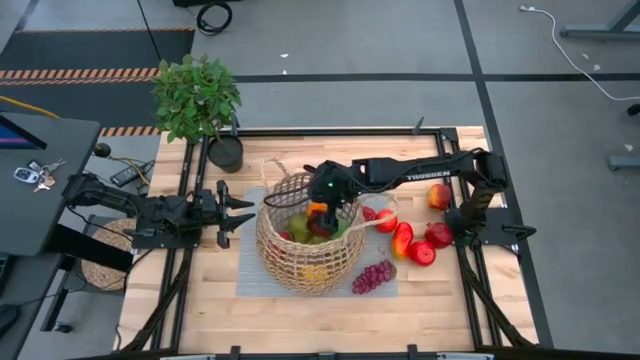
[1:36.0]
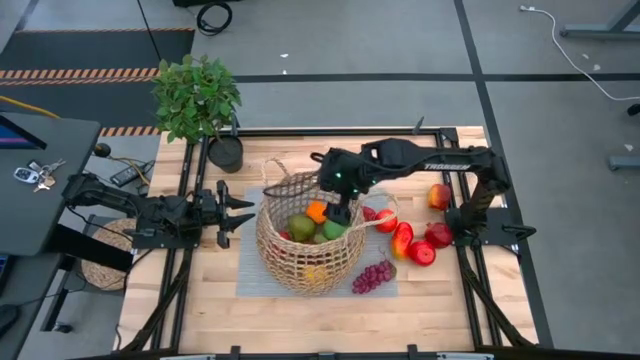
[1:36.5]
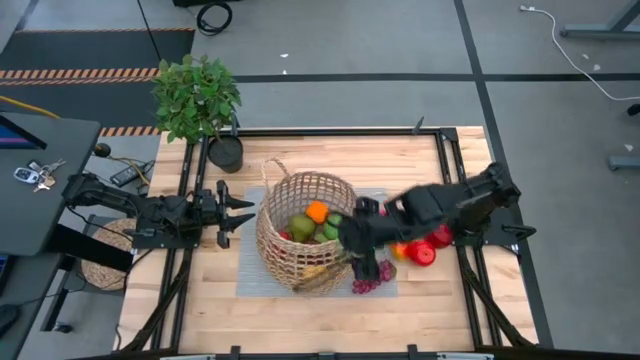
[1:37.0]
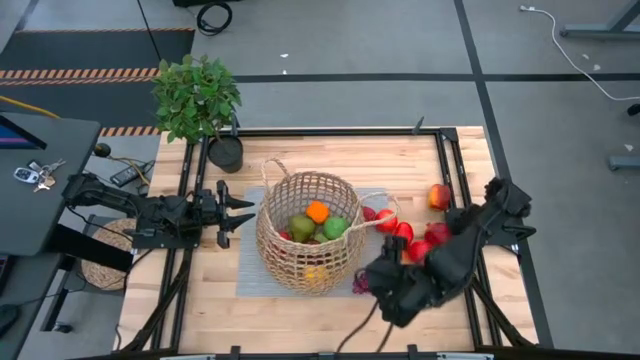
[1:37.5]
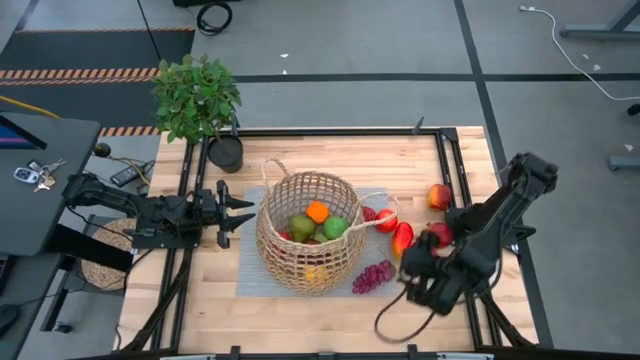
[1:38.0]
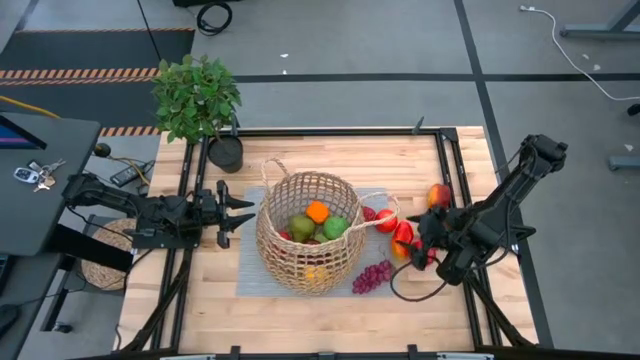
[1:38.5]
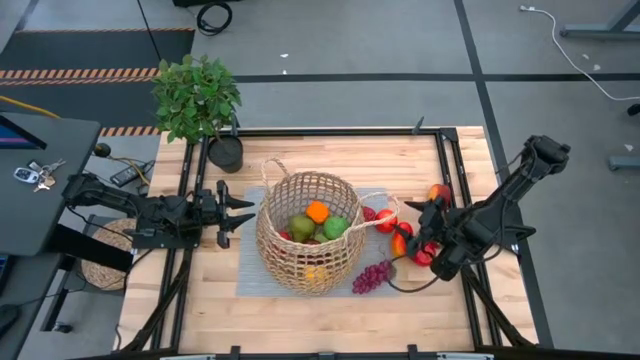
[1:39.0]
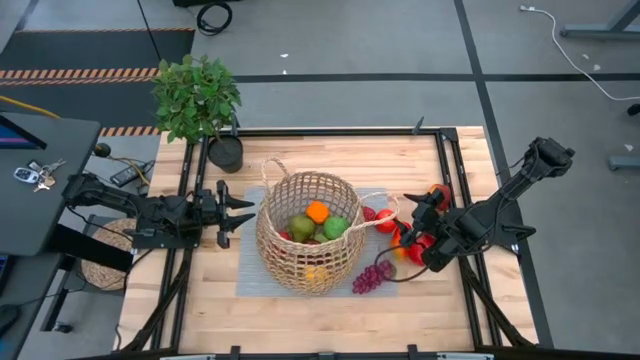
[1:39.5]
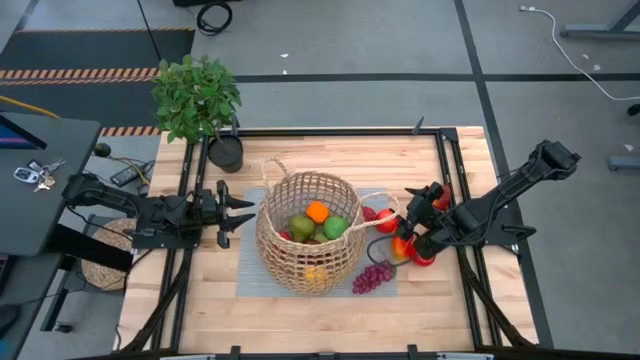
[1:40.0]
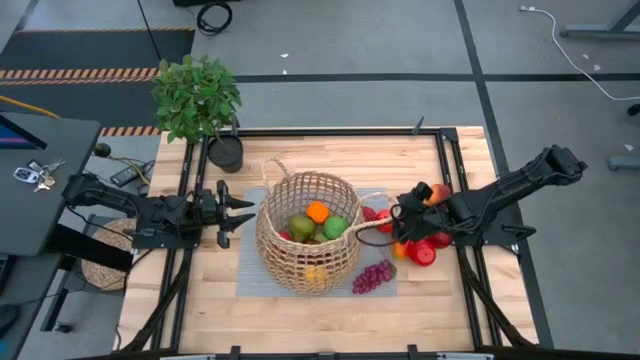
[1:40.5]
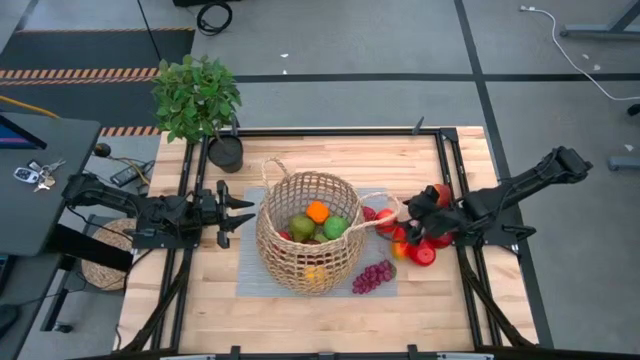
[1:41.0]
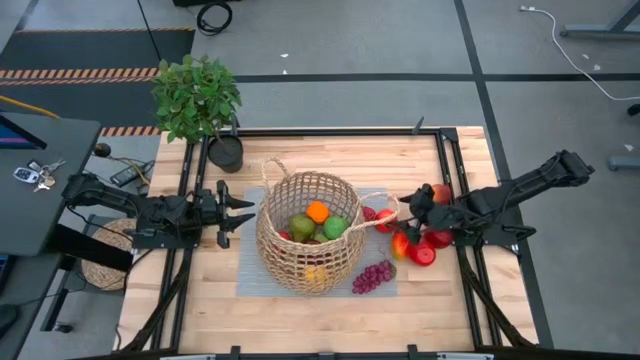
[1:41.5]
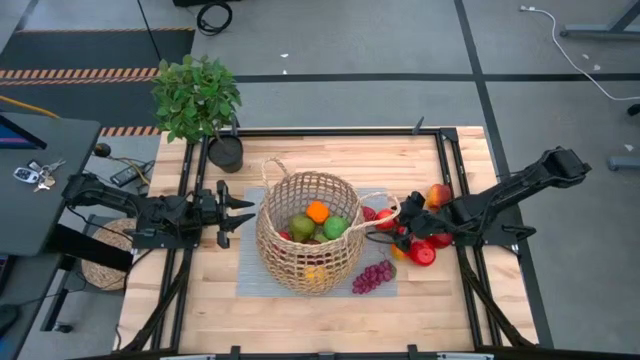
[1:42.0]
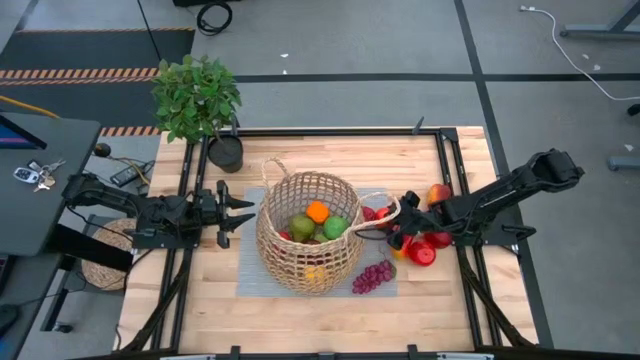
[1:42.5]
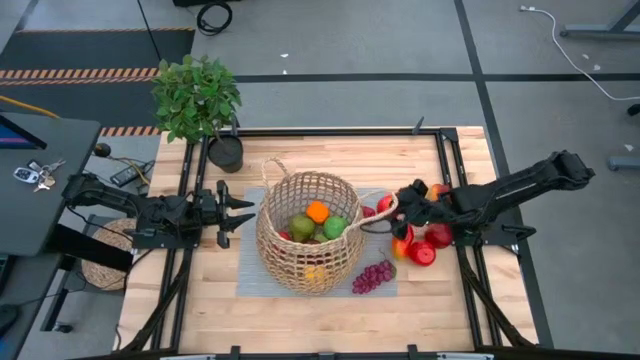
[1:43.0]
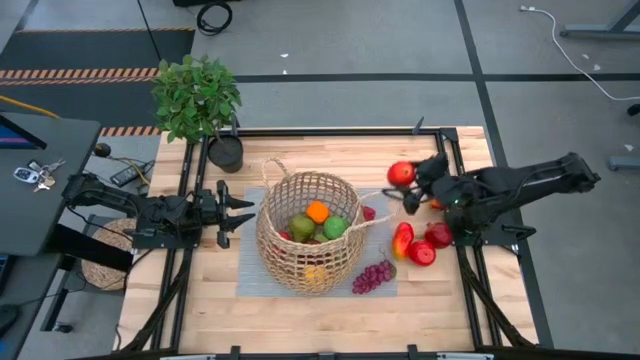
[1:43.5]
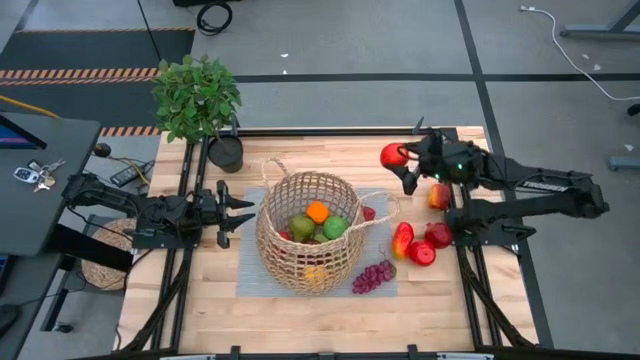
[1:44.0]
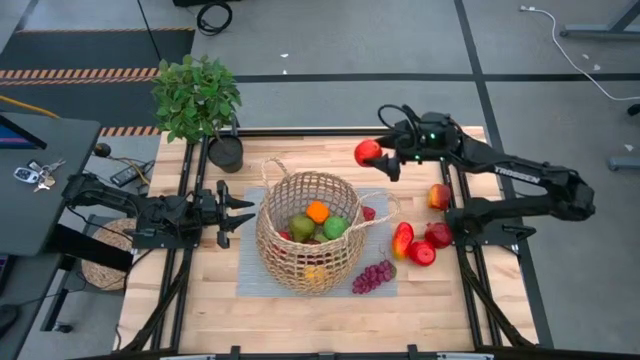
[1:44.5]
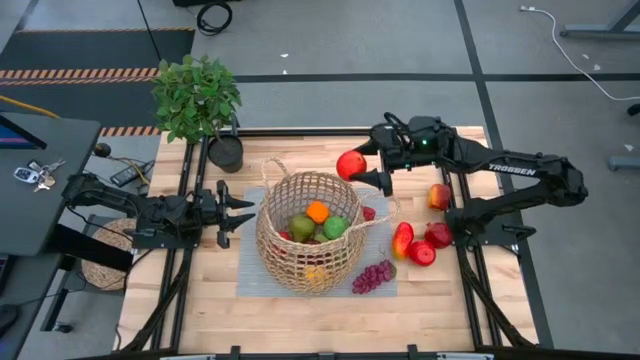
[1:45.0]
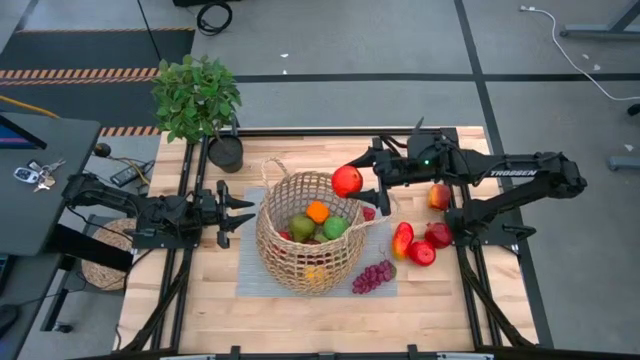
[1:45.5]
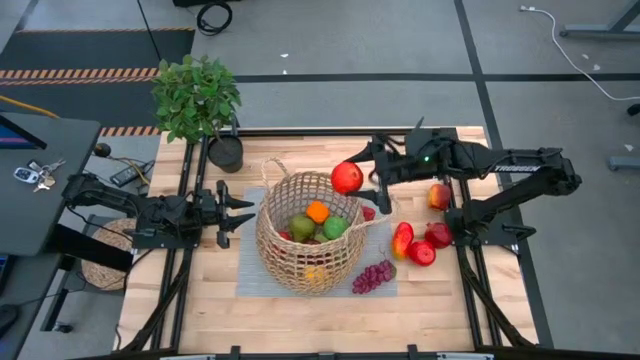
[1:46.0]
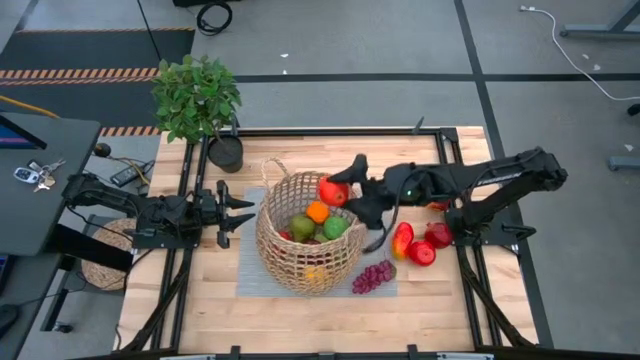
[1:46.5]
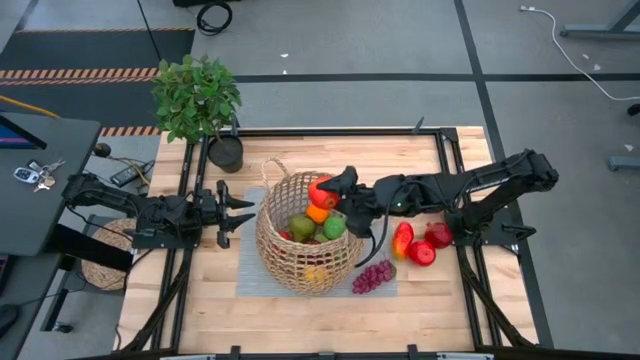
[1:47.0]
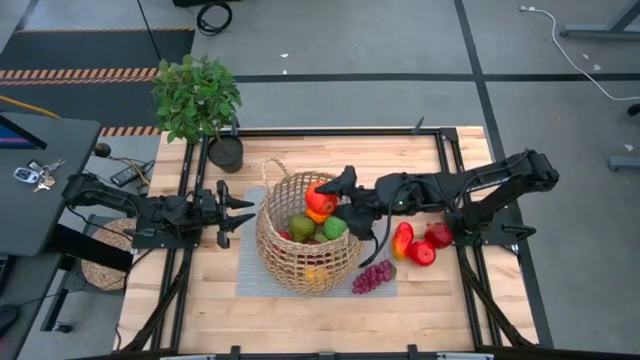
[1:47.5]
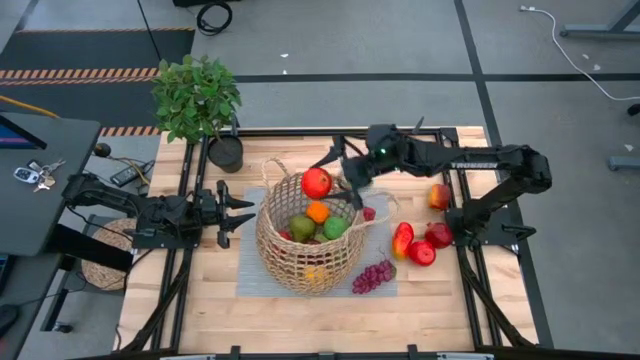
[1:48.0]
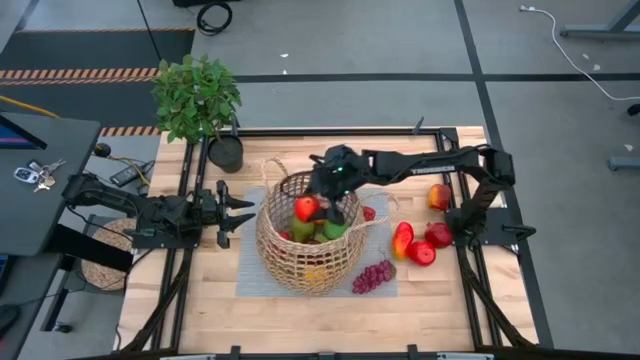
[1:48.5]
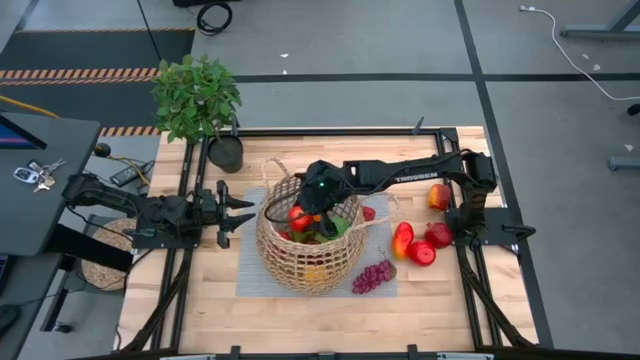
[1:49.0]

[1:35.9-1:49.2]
Task: Build produce basket
Put the top red apple into the basket

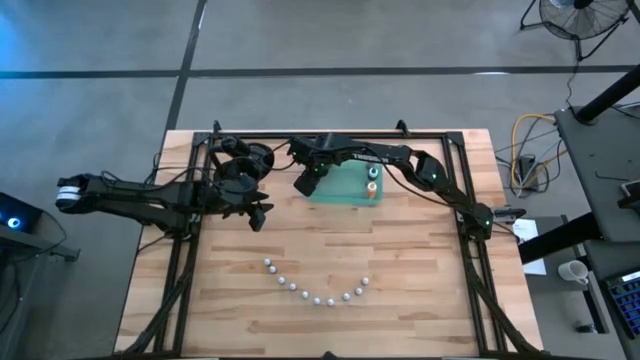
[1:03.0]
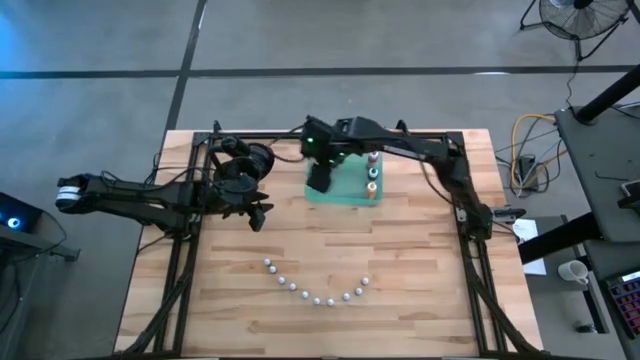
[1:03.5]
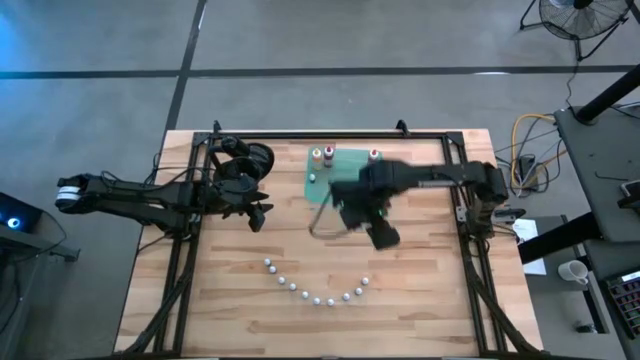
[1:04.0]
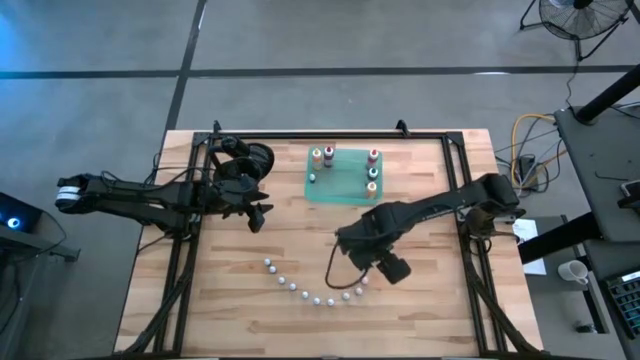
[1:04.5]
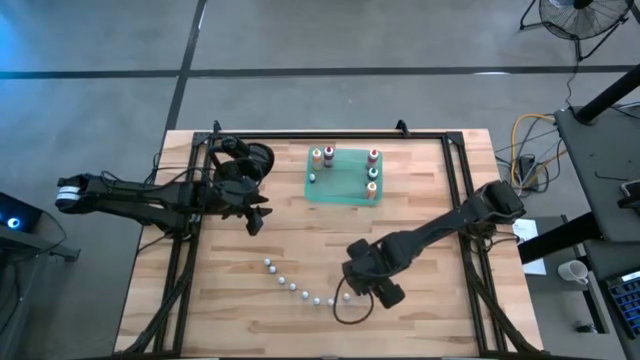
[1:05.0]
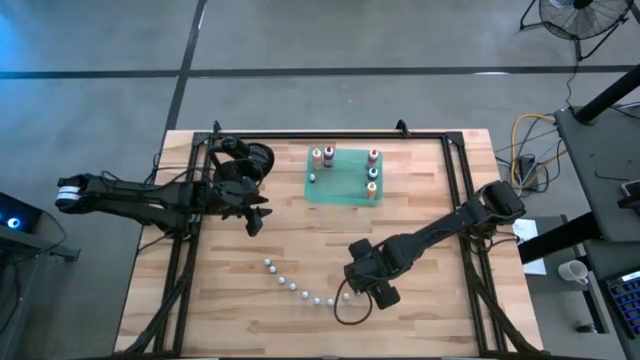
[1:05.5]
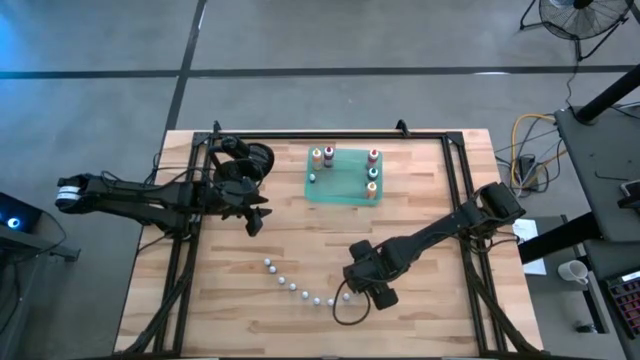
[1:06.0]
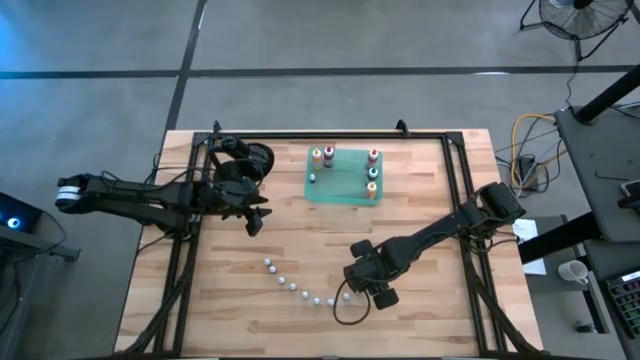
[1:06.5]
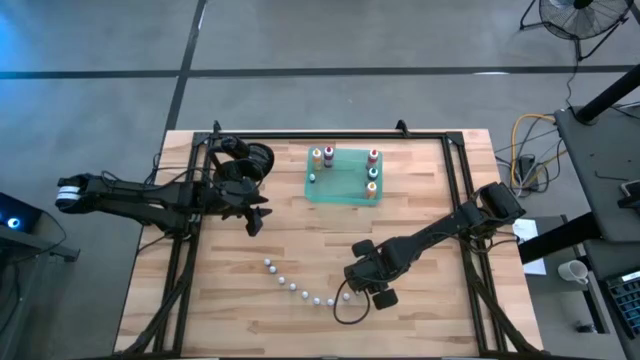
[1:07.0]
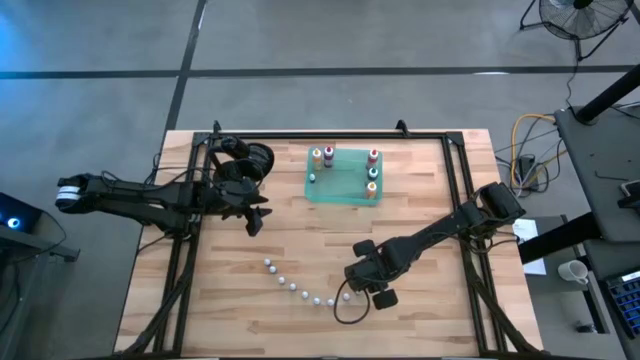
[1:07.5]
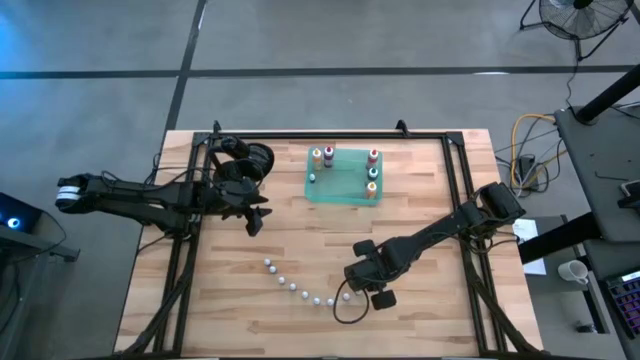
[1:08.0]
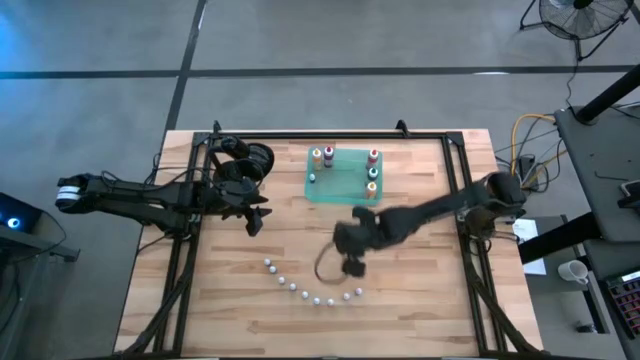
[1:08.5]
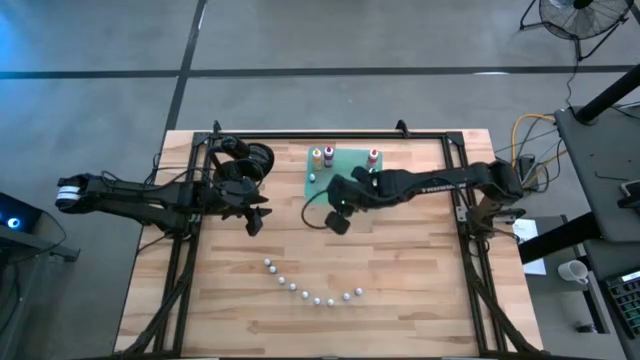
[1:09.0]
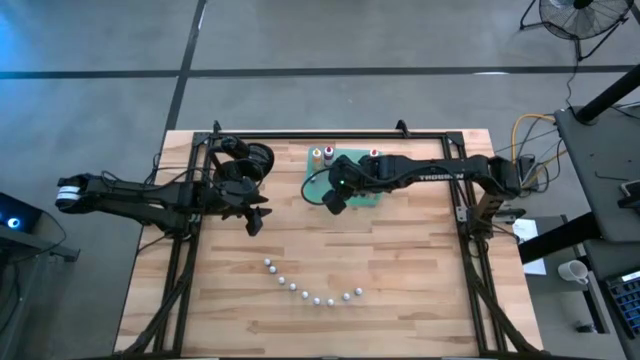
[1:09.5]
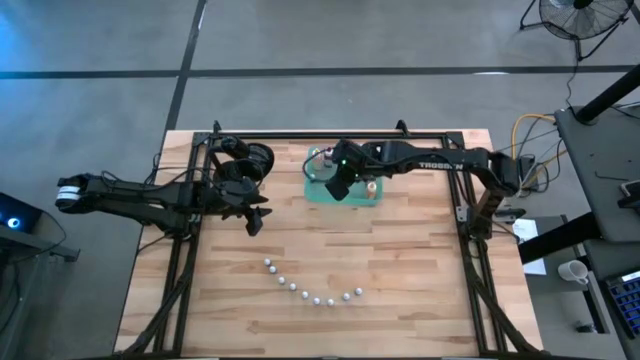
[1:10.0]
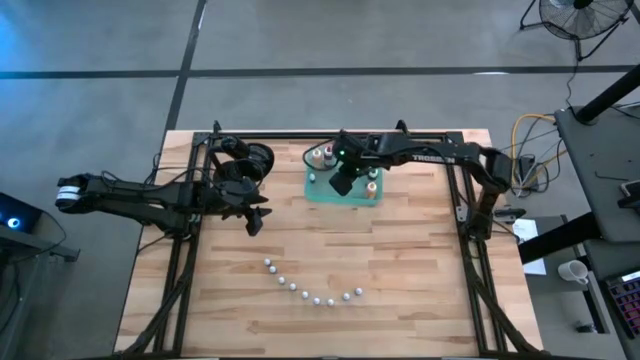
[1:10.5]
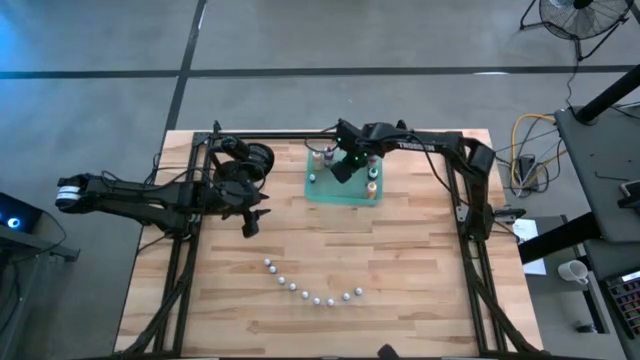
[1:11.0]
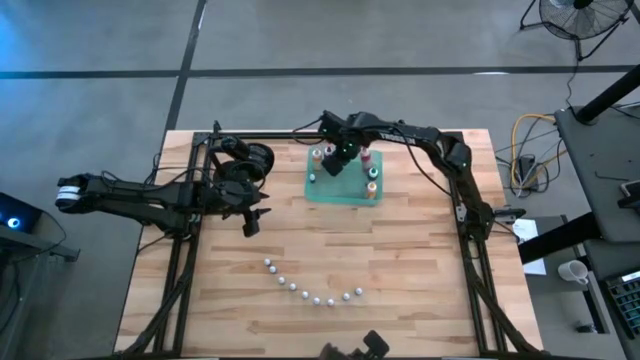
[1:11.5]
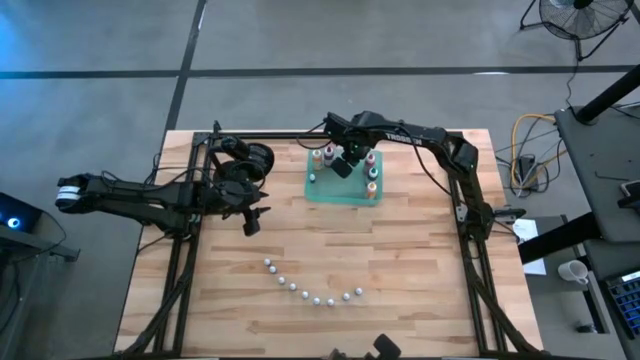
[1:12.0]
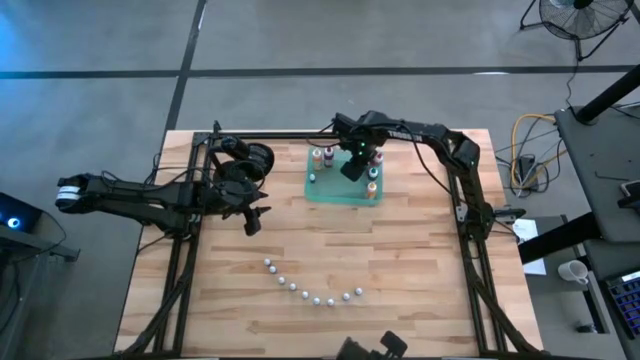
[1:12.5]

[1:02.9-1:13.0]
Task: Pick & Place food coloring
Put the right small black food coloring bottle into the green bin
